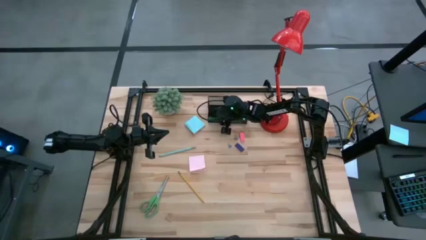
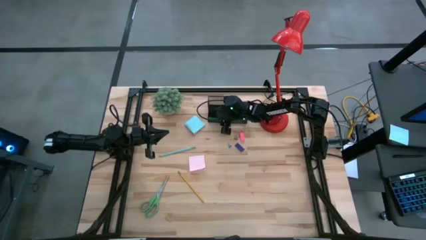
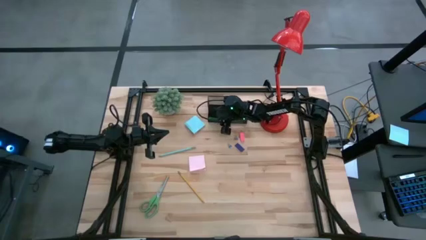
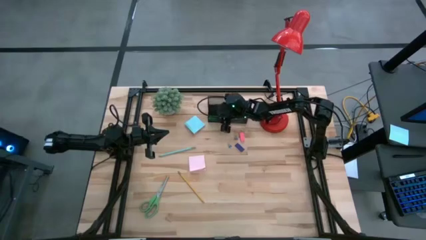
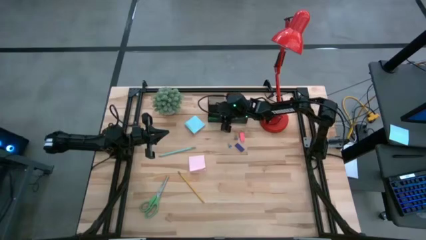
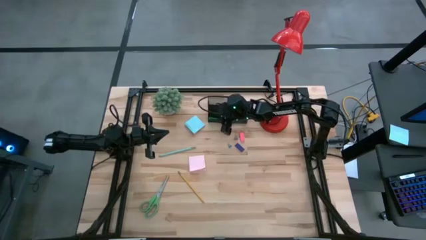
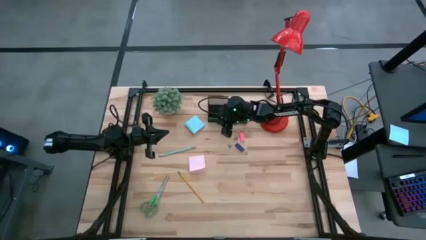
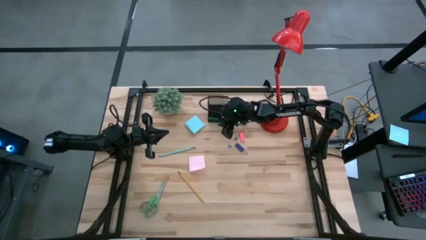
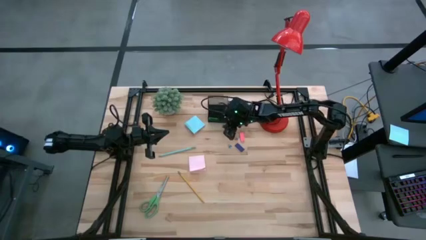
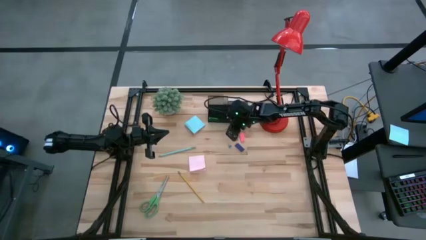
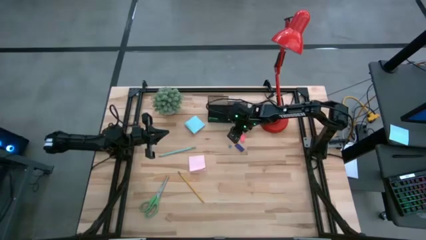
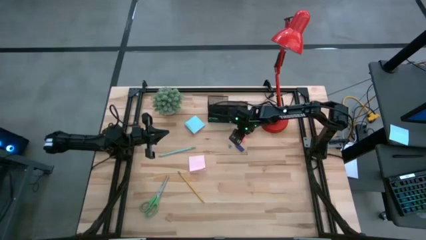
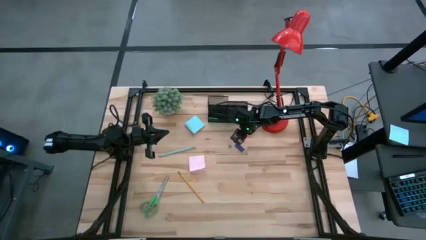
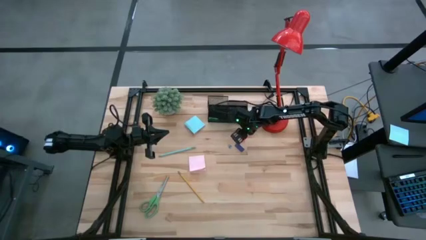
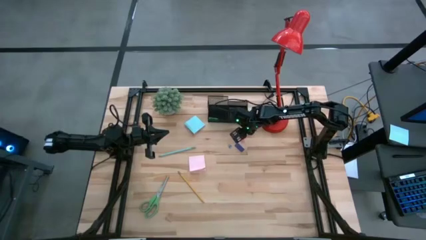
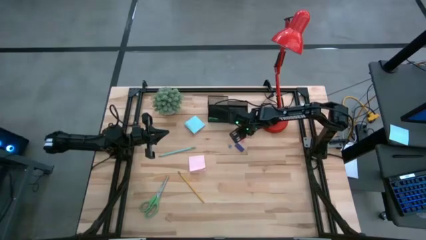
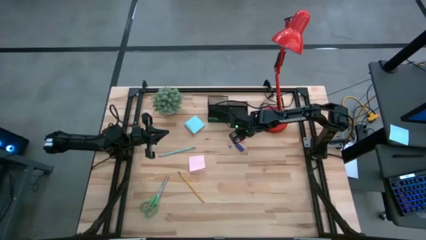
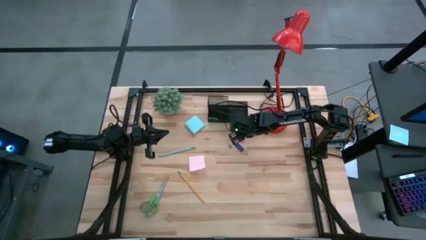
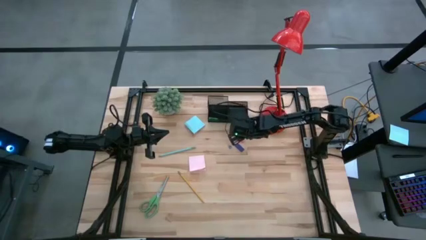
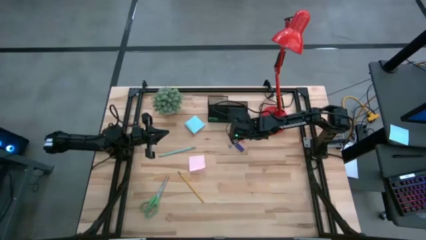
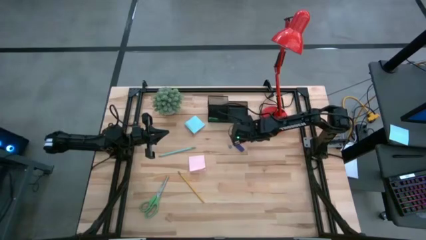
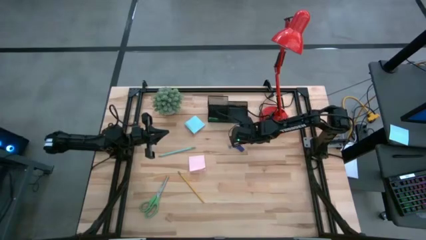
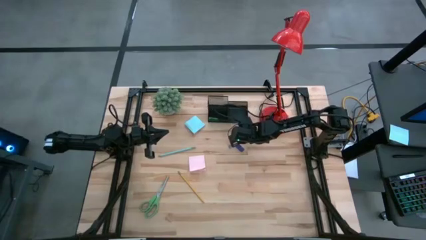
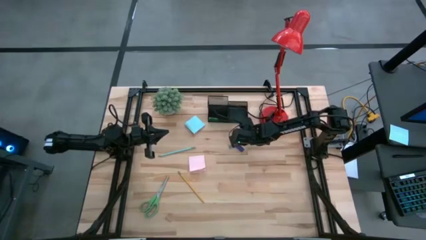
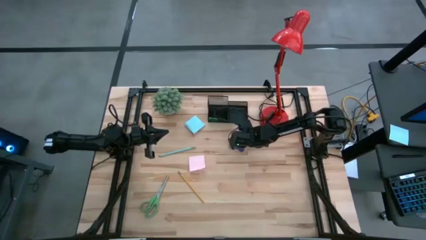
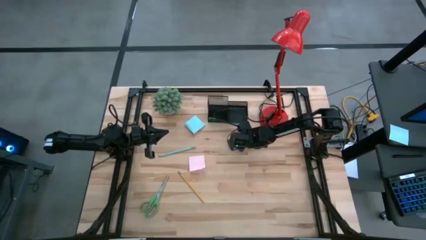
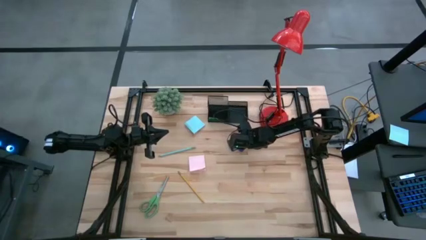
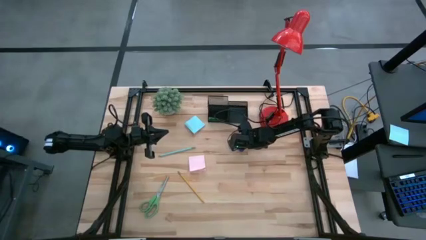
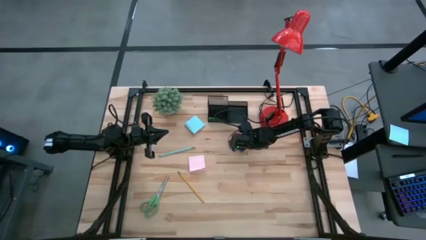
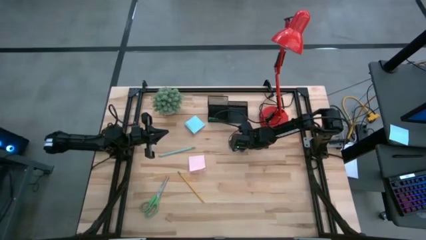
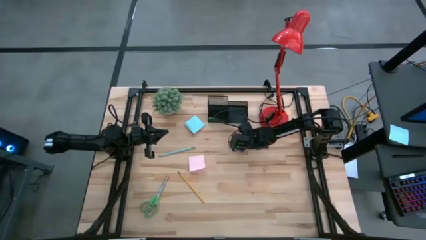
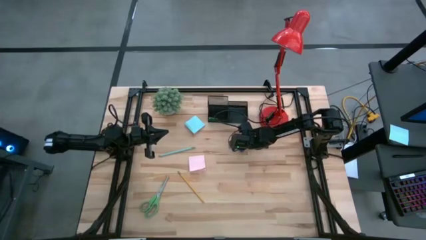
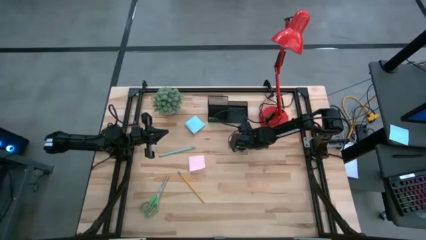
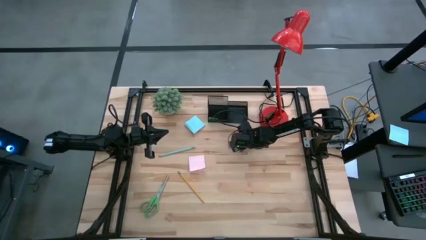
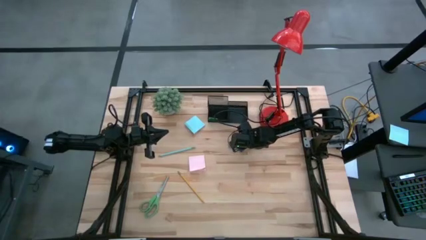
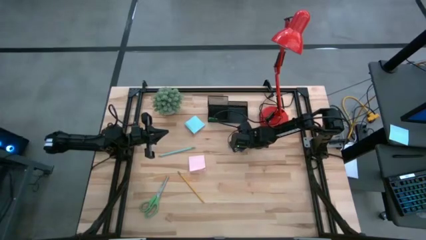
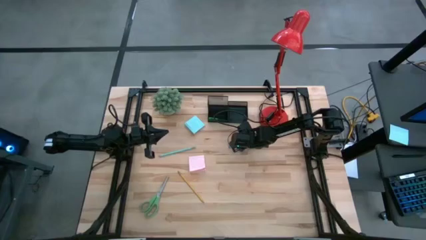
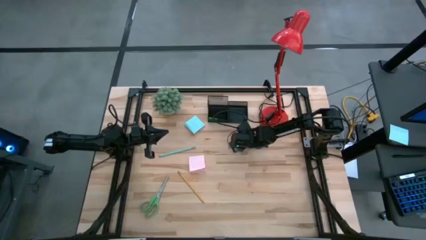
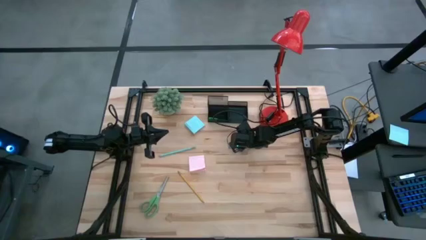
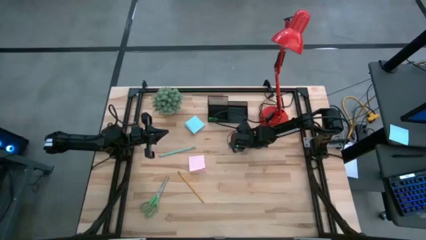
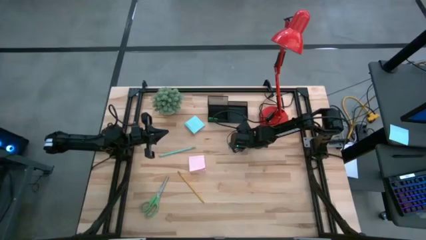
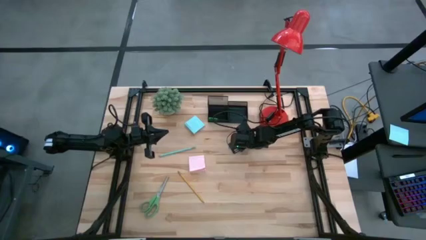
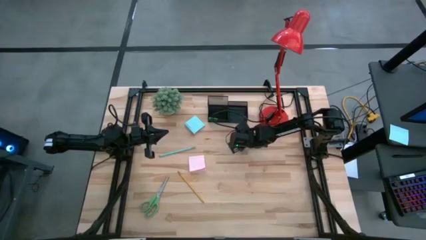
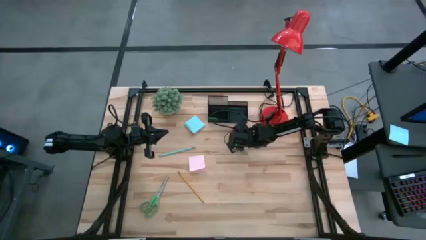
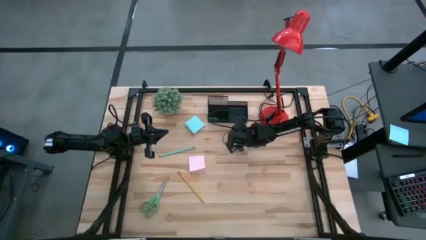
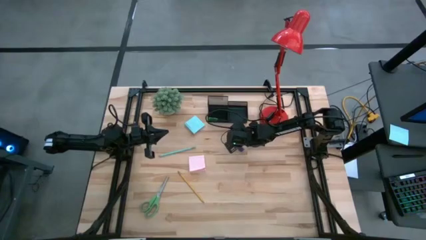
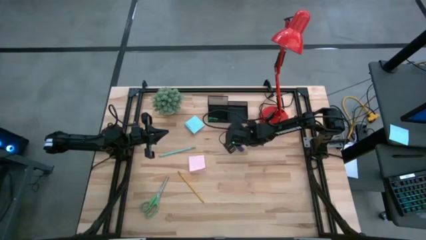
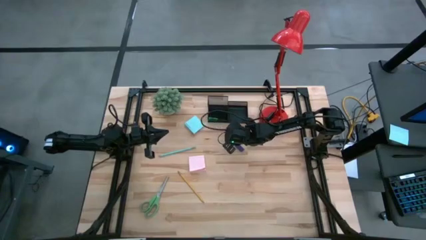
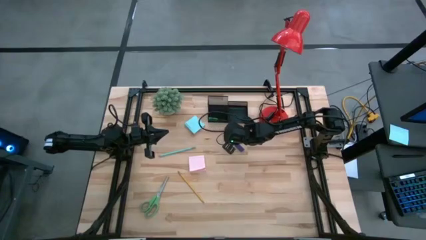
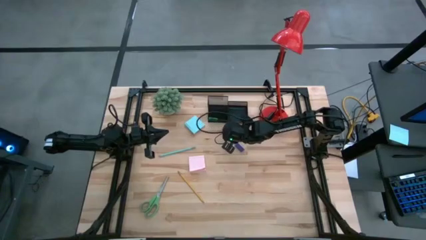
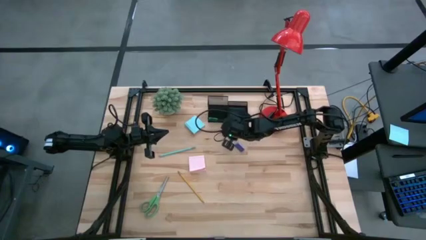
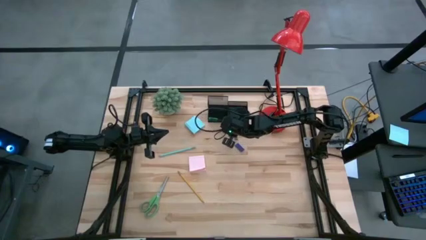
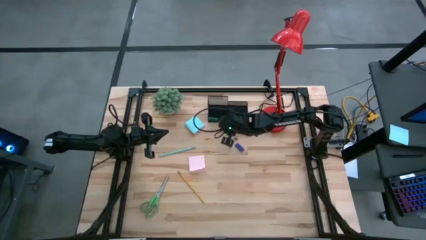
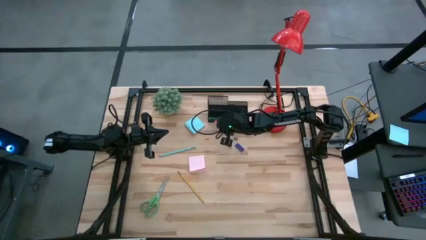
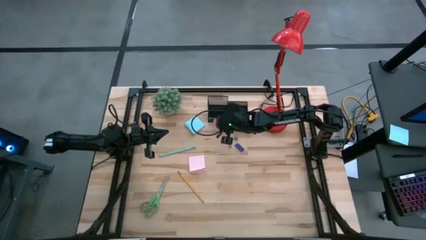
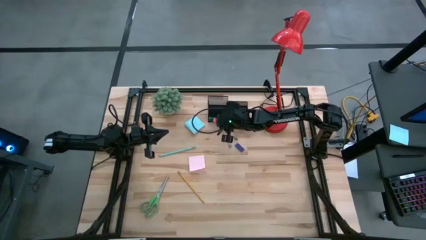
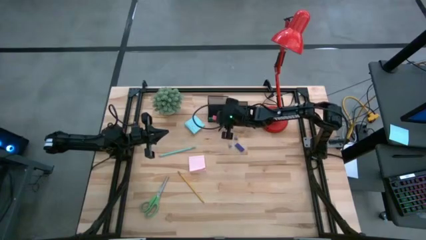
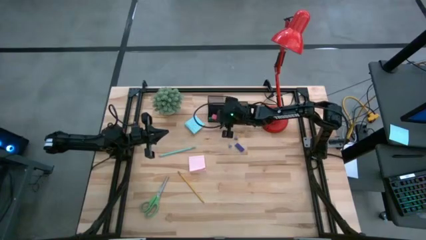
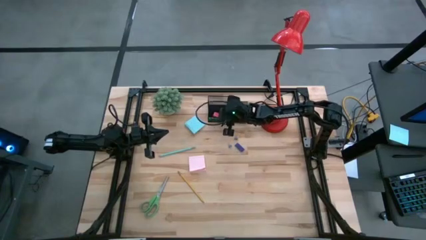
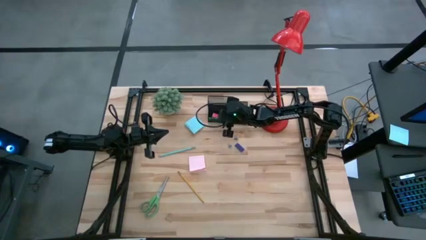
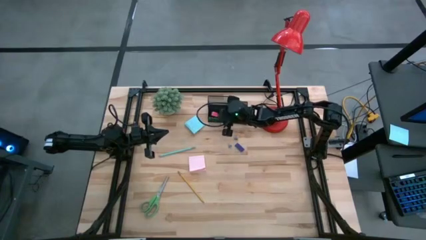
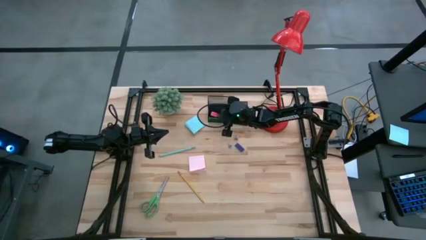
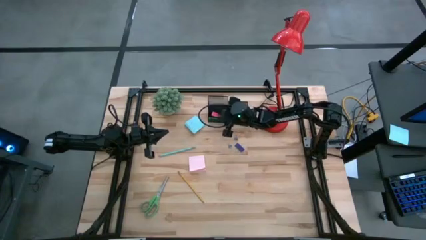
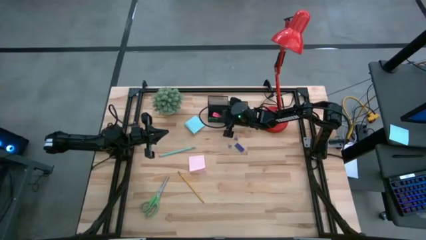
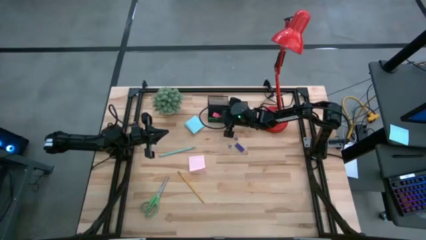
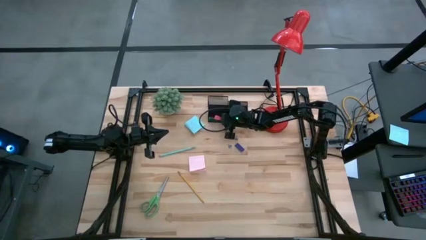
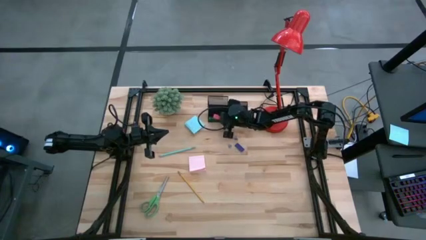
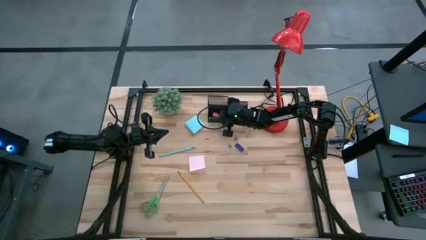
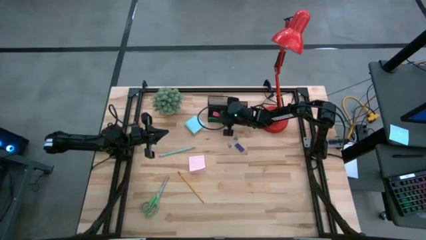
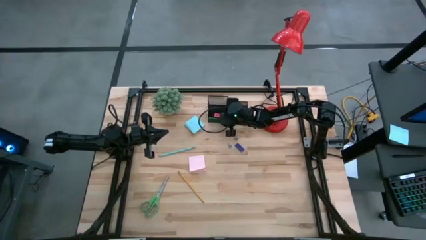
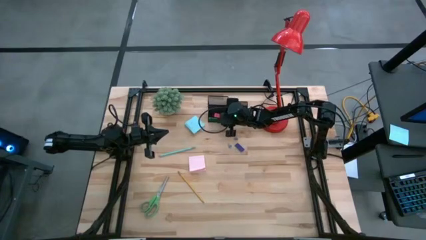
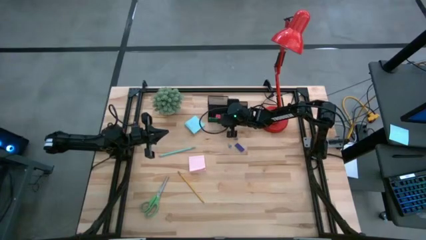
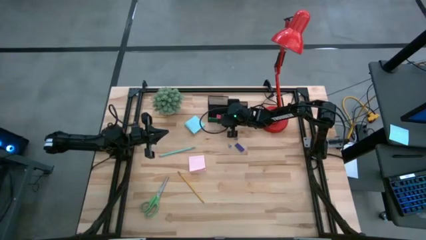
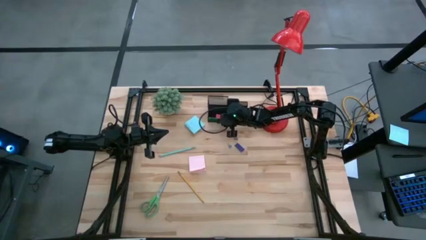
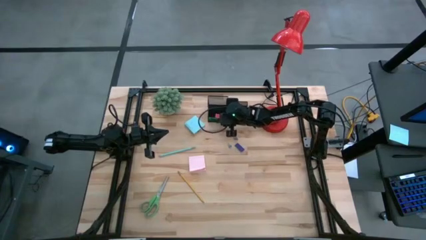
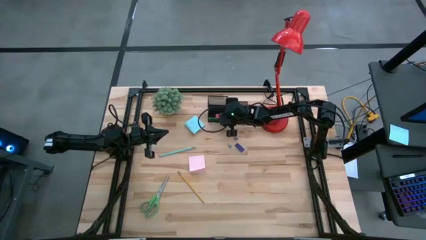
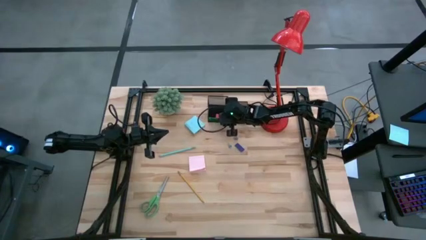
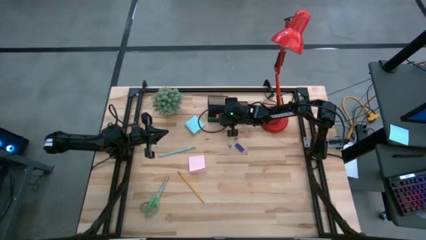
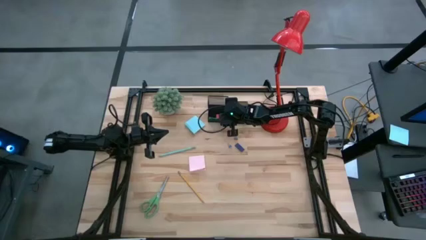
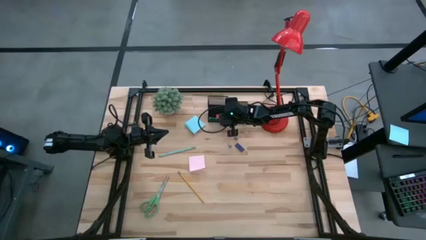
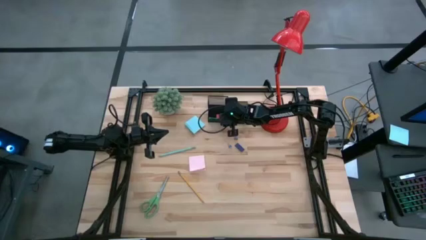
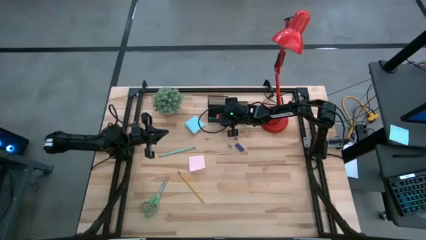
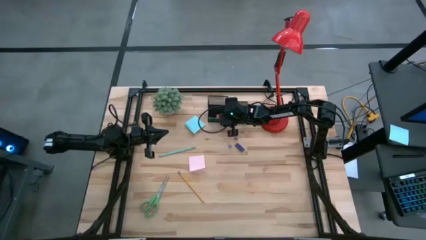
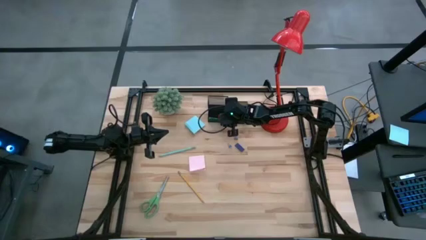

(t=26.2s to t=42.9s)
Task: Pick and place office supplies into organizer
Put the pink eraser into the desk organizer
